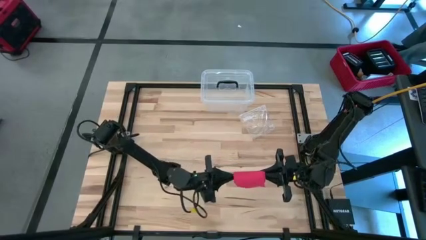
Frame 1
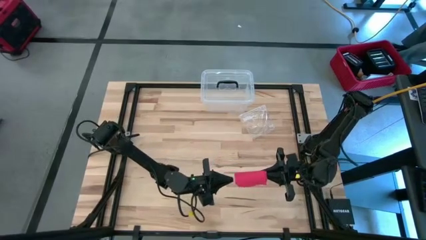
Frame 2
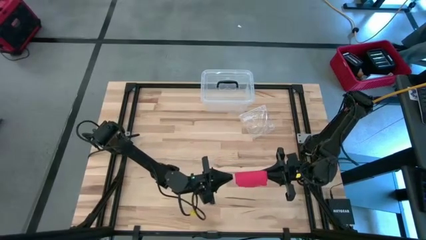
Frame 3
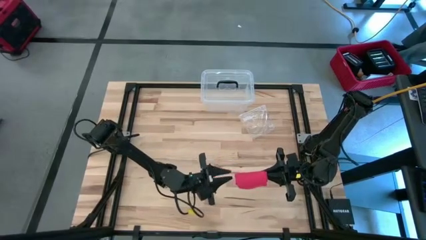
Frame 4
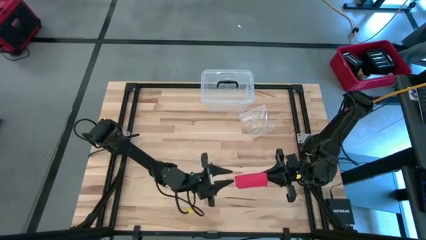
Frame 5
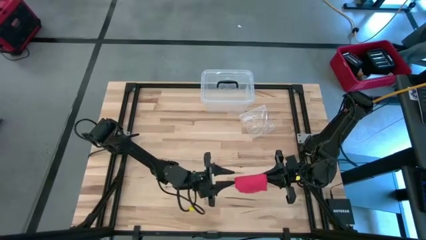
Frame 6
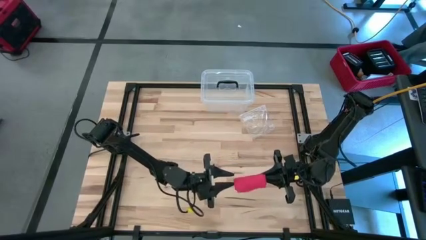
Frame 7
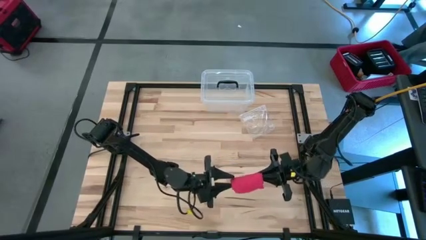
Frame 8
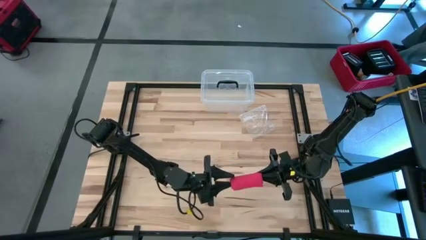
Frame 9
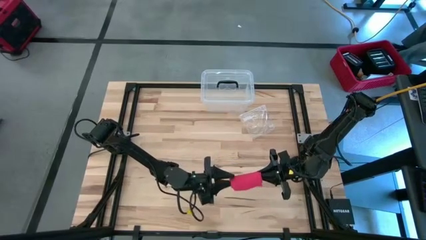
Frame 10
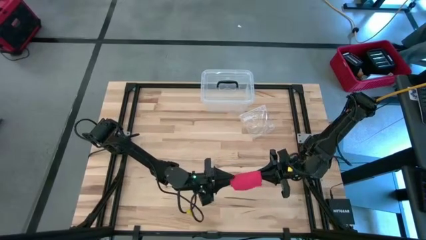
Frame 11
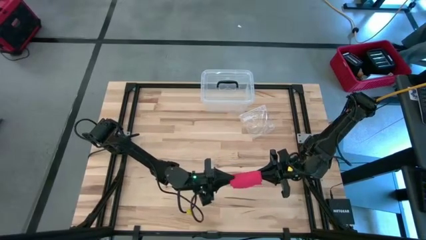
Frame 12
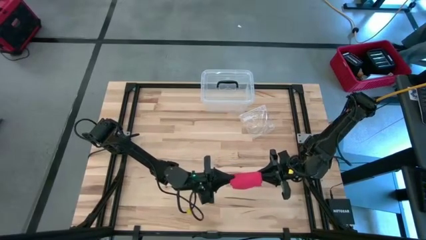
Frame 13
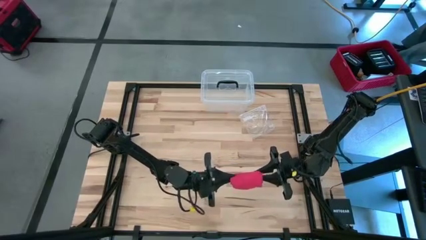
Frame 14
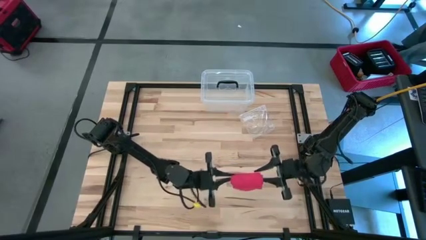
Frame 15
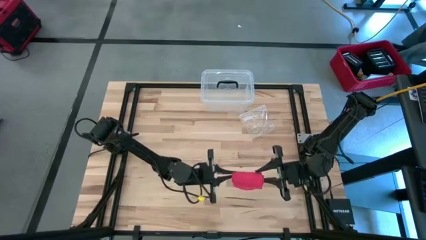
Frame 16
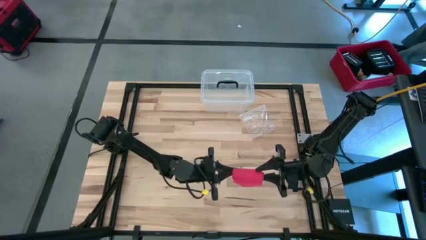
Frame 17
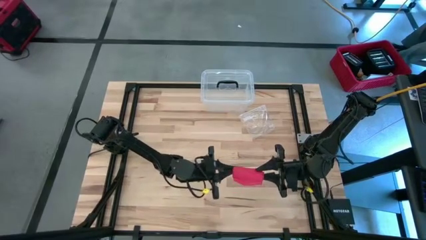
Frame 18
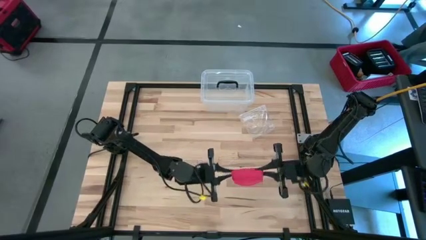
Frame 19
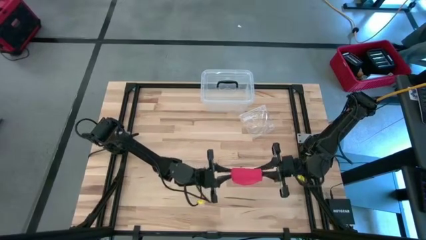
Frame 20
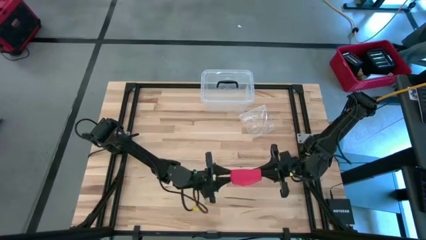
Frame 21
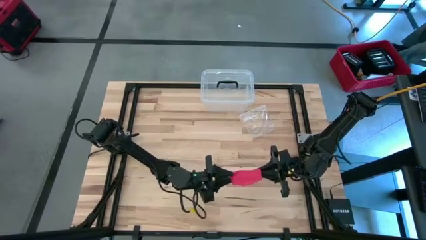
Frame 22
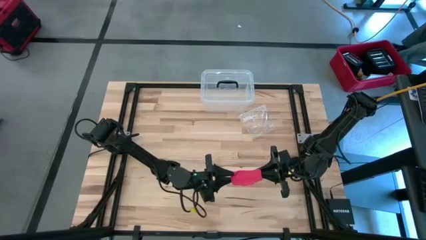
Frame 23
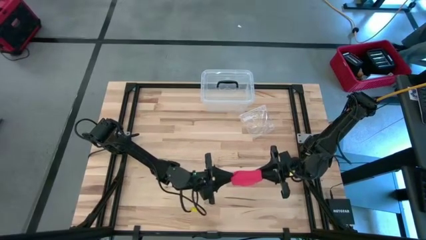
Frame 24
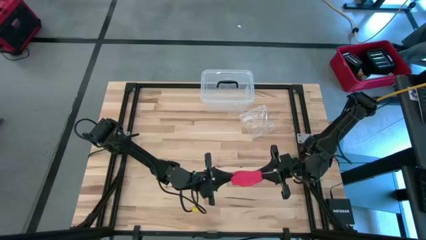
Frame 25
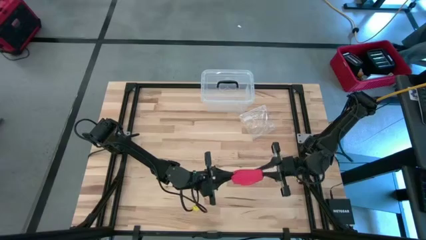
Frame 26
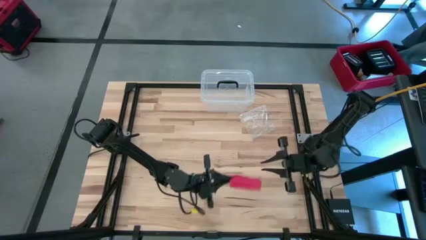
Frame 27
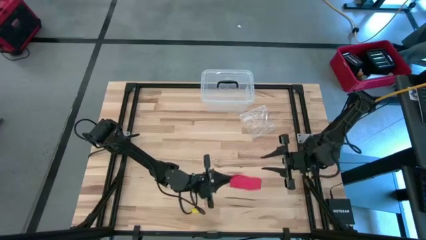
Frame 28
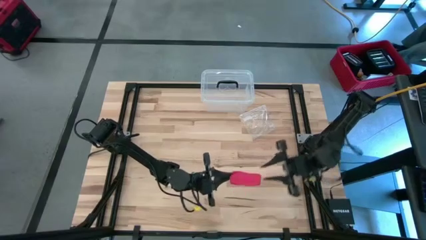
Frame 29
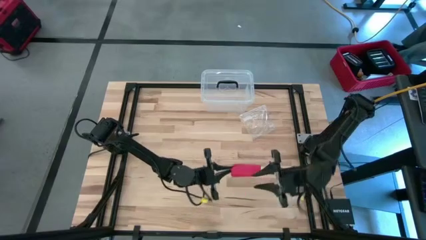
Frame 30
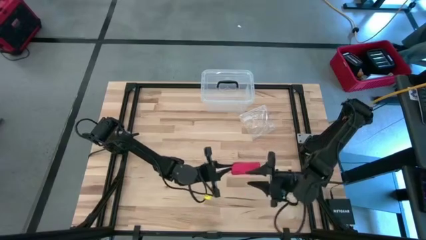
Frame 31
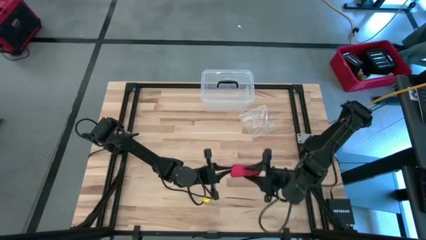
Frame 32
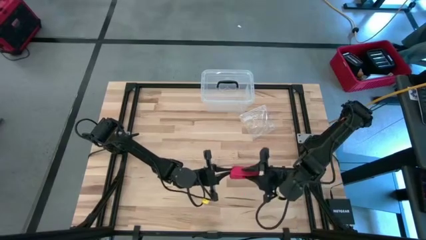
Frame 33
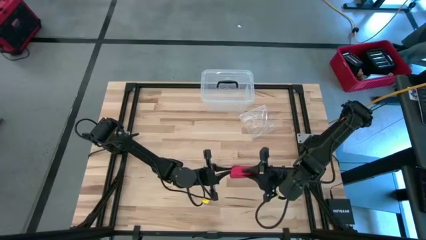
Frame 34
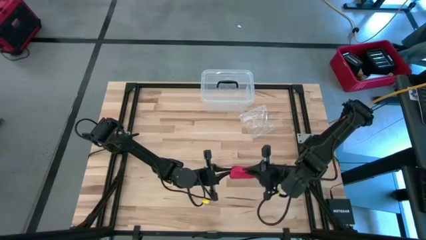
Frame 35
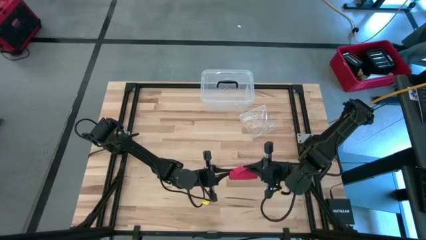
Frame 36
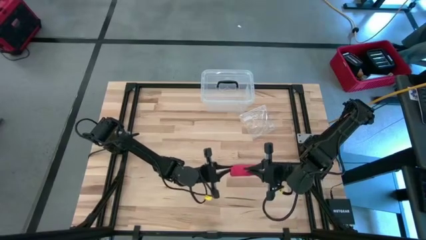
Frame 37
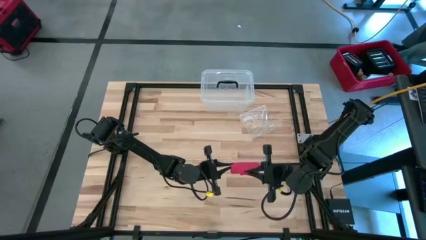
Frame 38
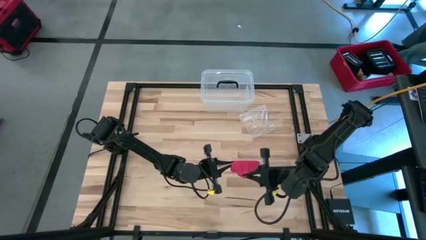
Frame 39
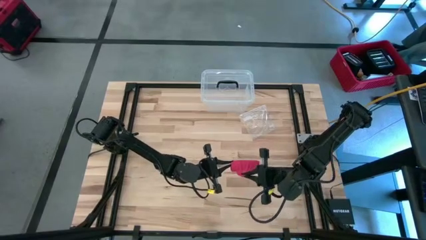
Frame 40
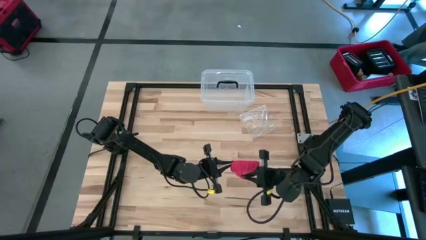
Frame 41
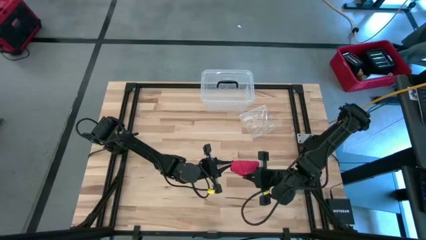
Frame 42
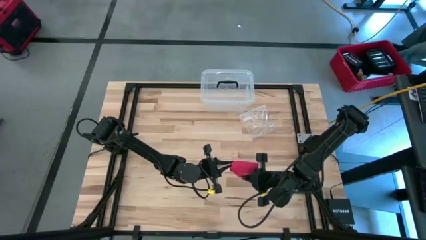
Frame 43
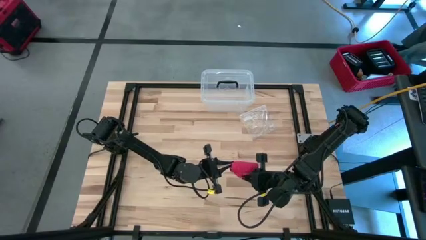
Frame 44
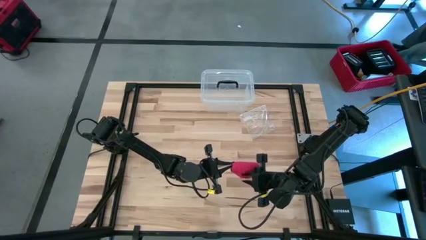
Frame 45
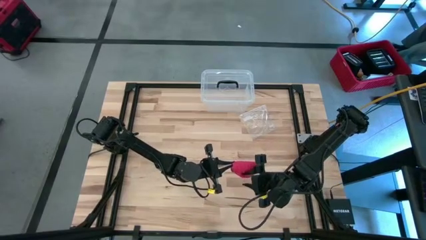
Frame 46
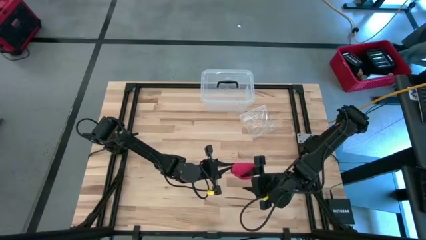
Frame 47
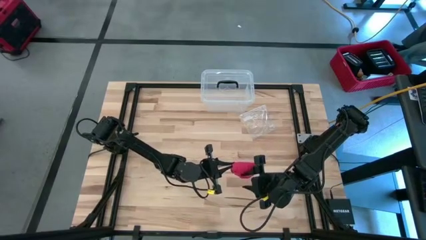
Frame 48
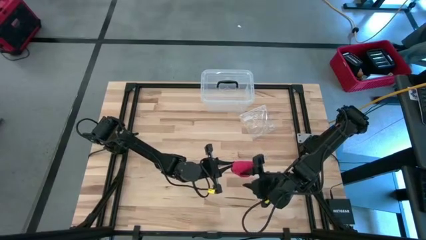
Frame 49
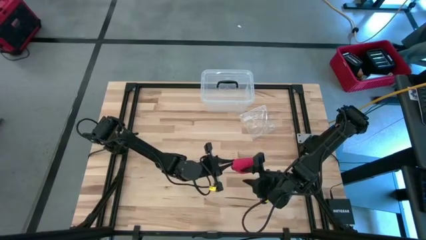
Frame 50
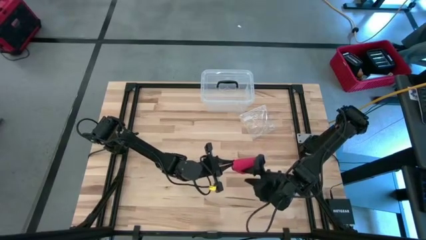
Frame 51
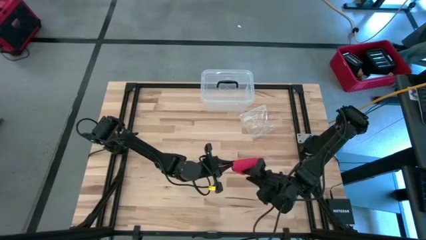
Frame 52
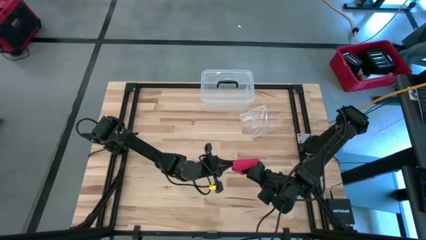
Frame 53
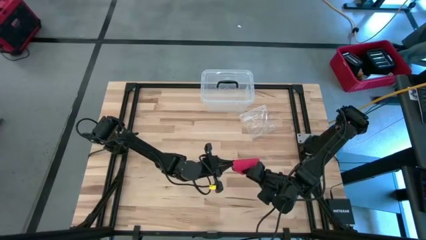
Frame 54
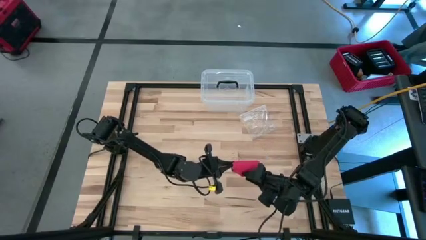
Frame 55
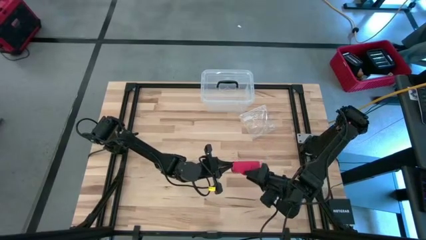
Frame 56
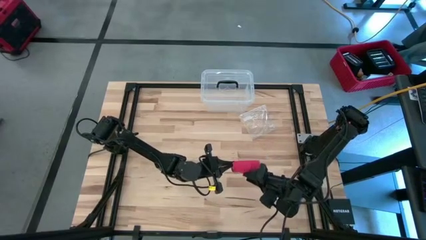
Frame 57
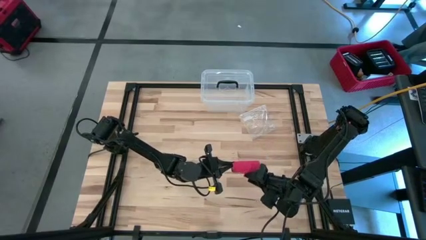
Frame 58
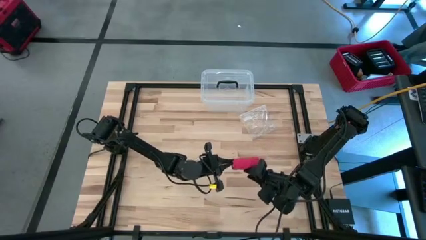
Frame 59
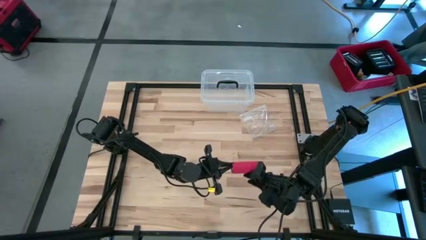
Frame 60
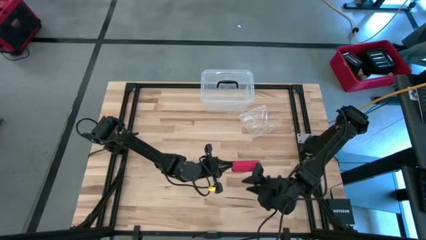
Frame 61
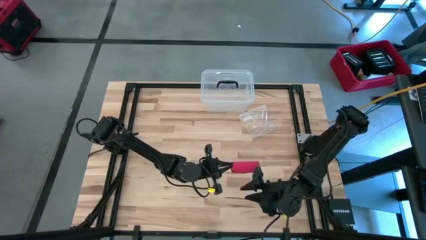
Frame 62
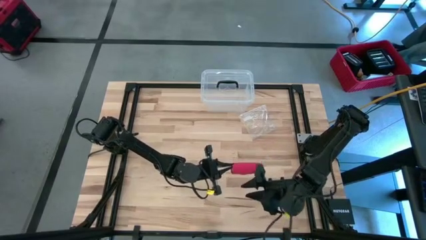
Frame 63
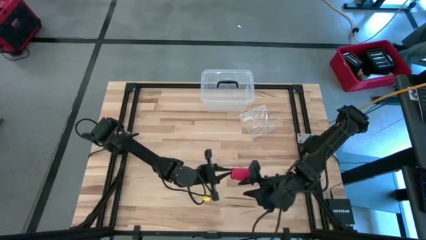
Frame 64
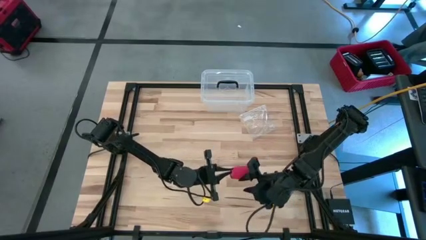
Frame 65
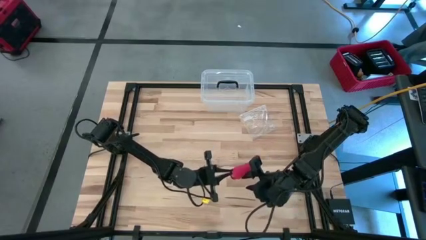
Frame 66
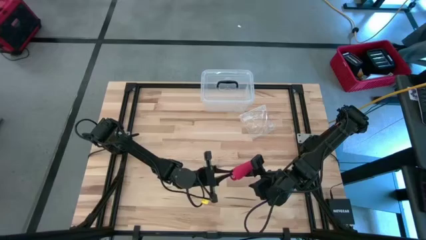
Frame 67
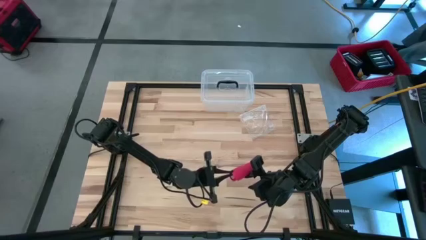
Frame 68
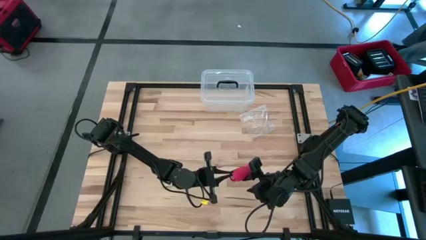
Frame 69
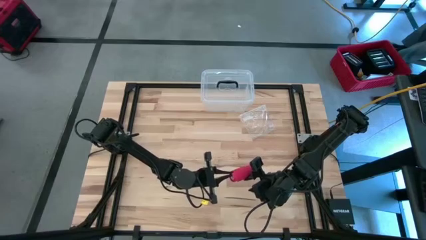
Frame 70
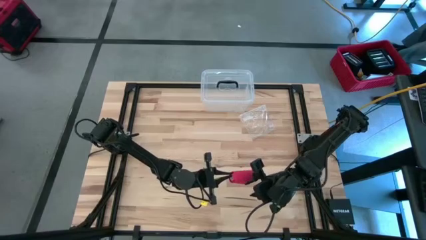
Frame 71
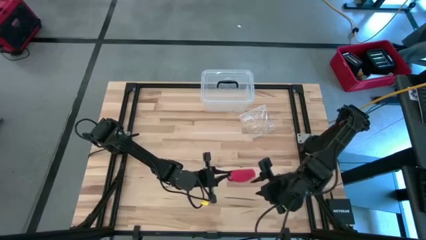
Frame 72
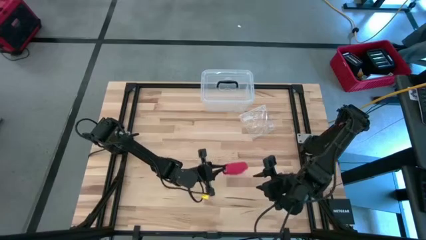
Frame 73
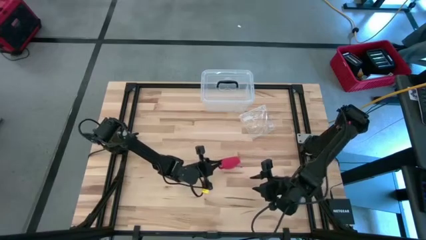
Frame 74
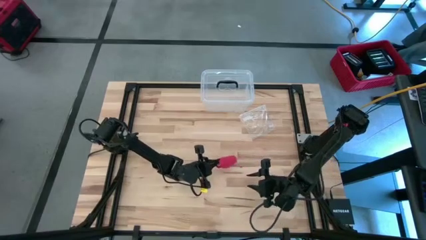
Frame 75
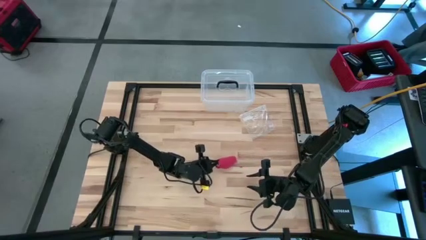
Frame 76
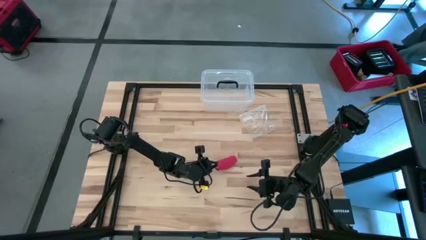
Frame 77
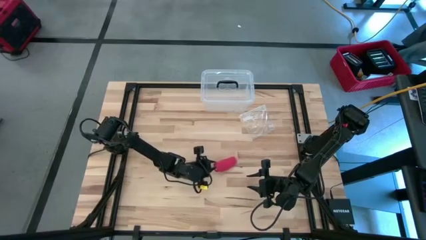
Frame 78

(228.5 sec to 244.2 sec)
Task: Roll bandage
Roll the red bandage

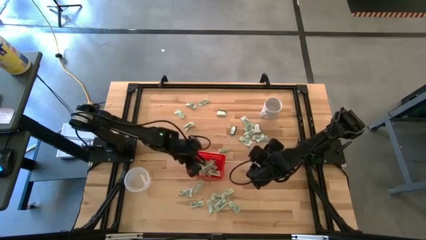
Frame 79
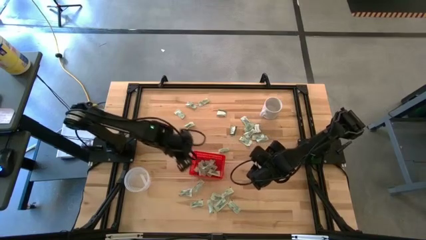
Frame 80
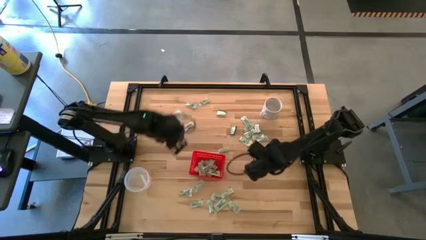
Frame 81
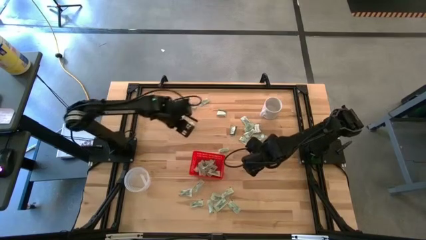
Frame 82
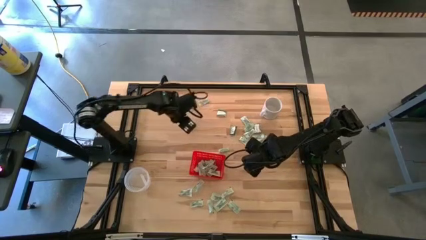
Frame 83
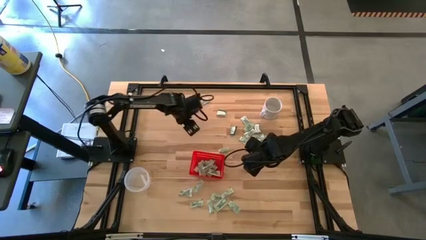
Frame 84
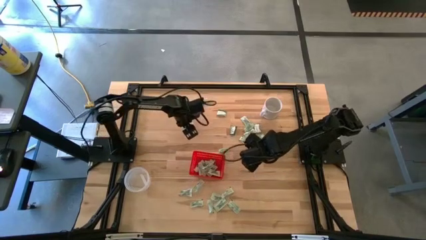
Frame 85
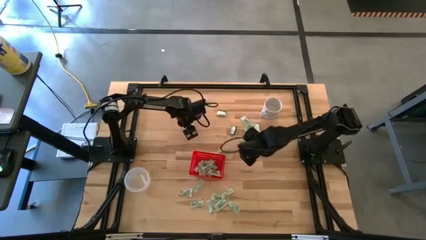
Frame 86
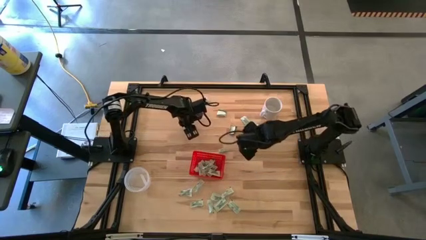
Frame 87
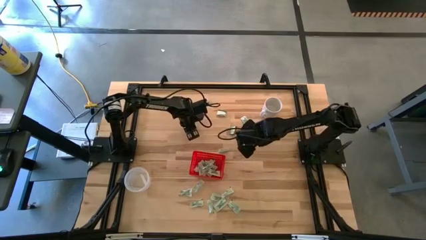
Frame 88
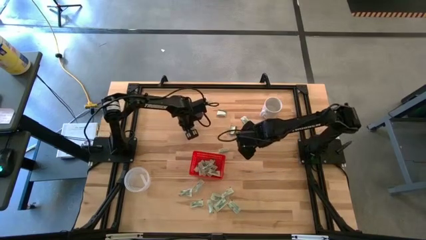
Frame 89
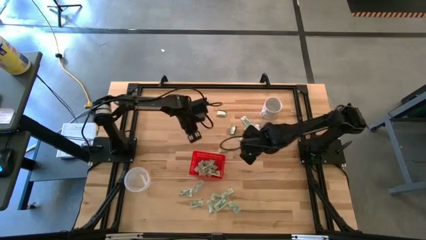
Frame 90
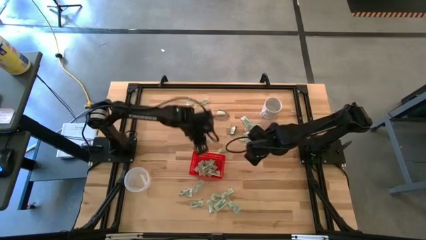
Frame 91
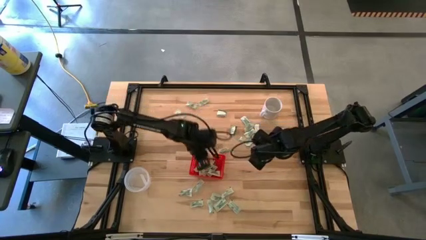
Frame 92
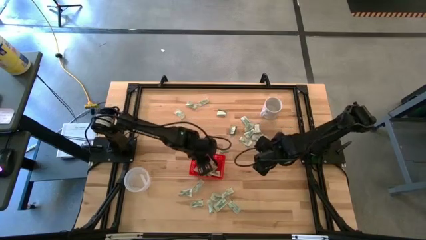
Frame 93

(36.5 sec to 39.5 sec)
Task: Pick and place Stevia / Truvia into bins
Put the green stevia packet into the red basket
